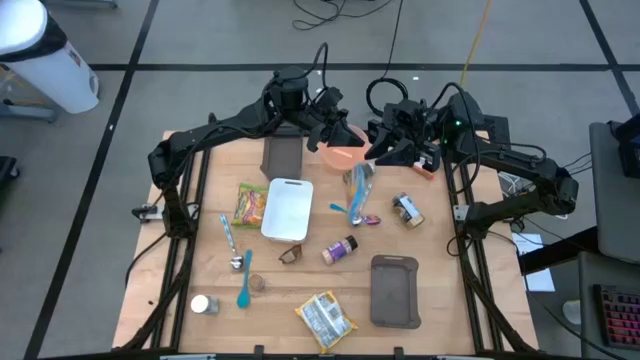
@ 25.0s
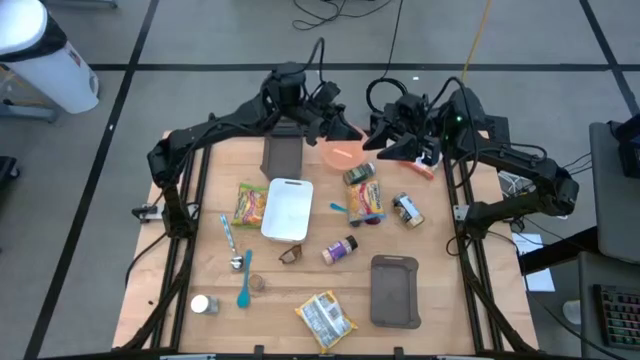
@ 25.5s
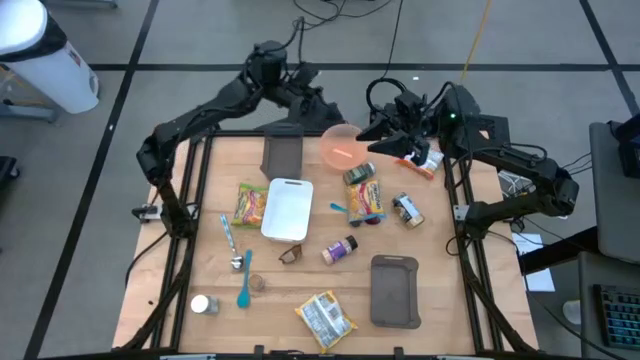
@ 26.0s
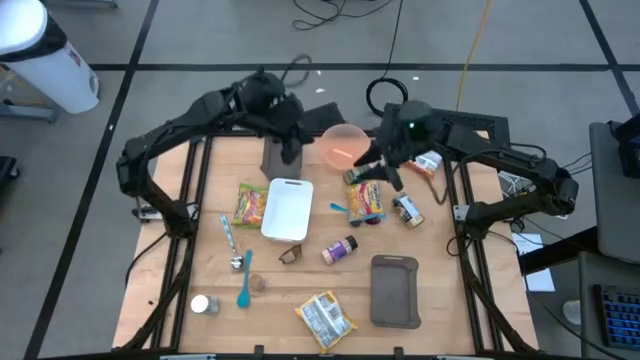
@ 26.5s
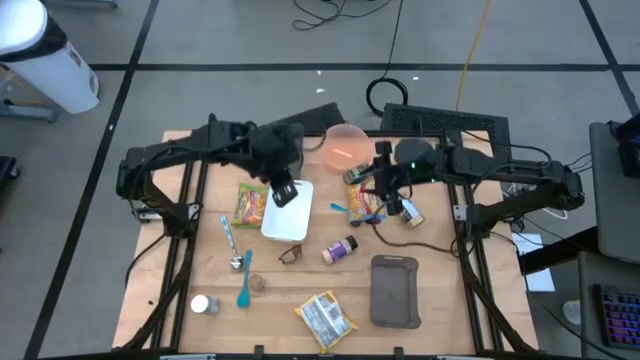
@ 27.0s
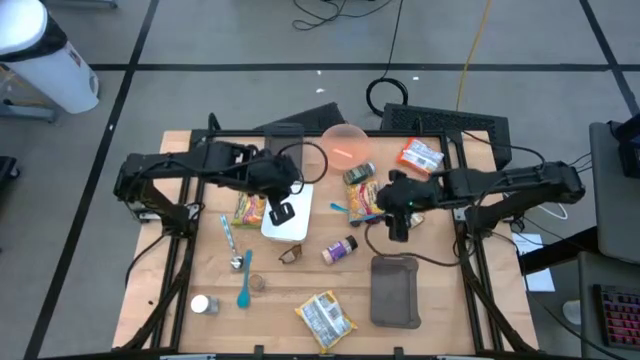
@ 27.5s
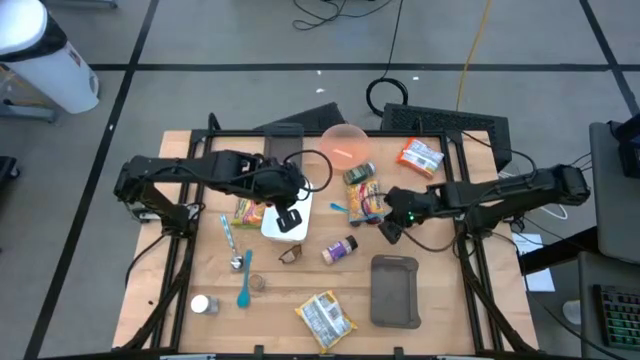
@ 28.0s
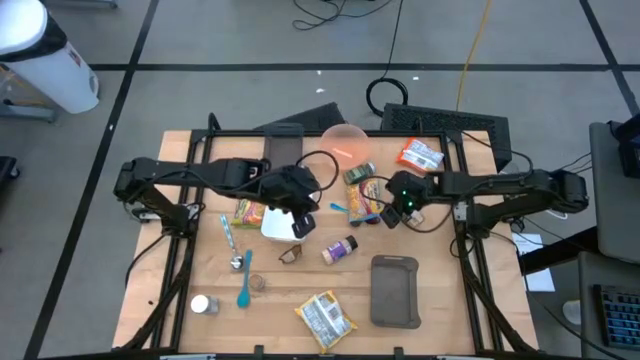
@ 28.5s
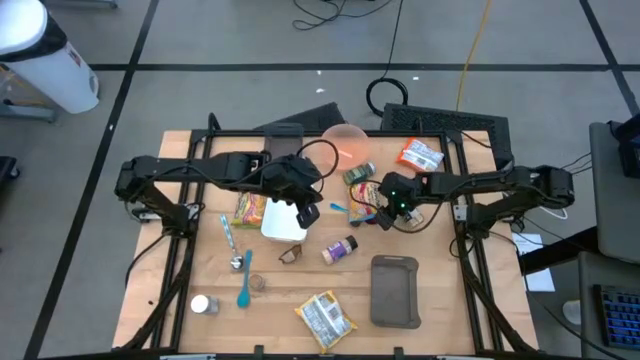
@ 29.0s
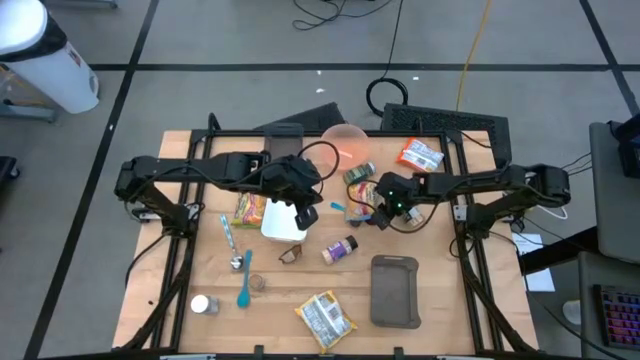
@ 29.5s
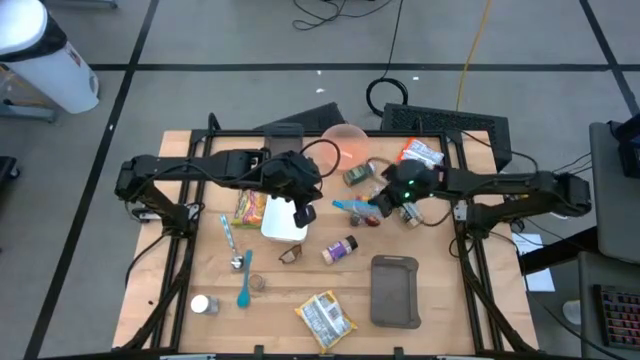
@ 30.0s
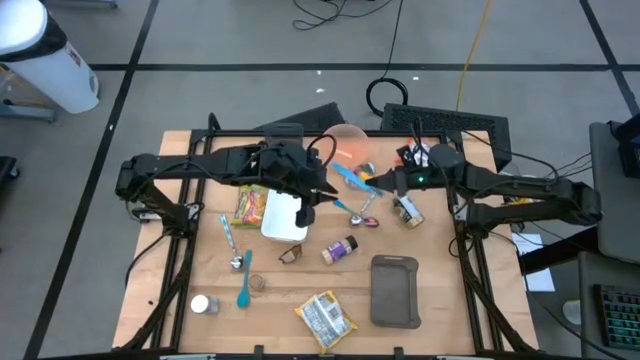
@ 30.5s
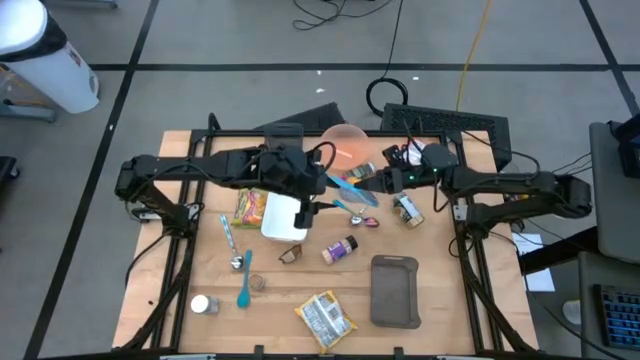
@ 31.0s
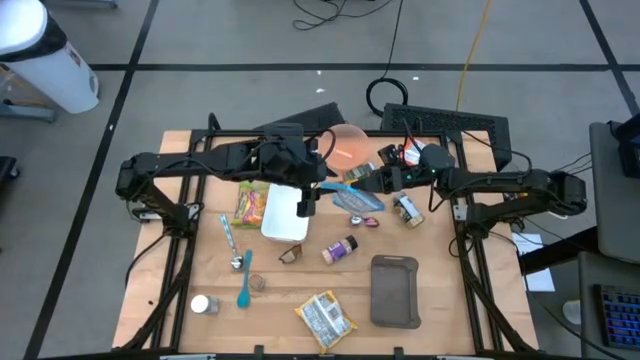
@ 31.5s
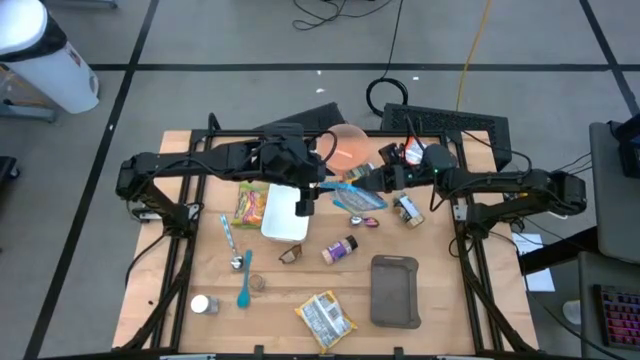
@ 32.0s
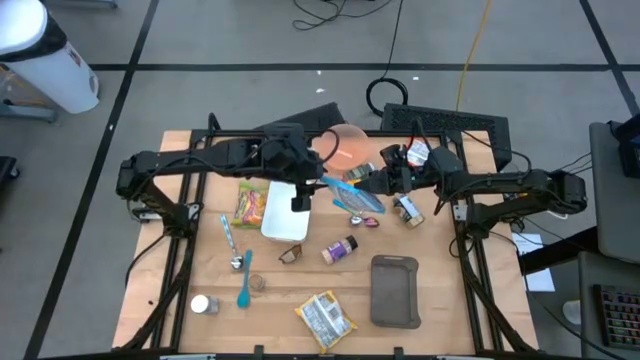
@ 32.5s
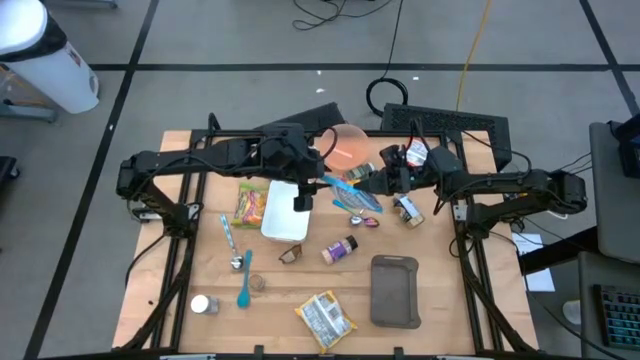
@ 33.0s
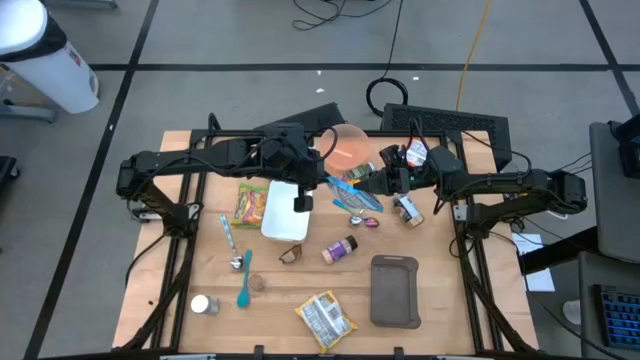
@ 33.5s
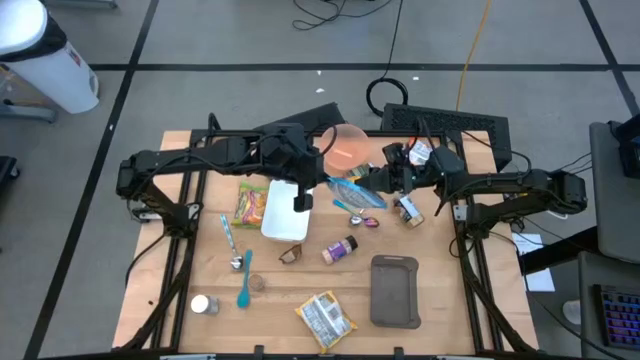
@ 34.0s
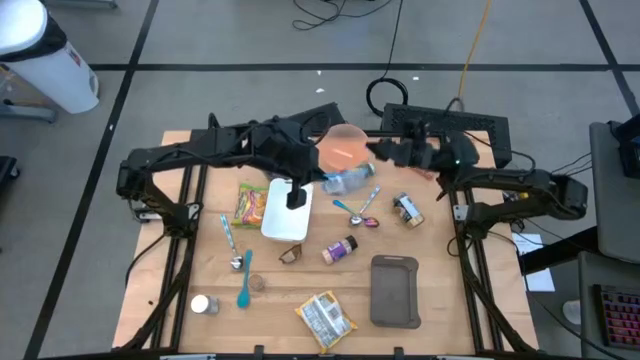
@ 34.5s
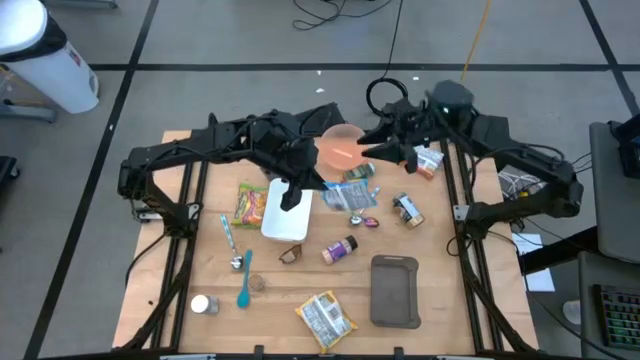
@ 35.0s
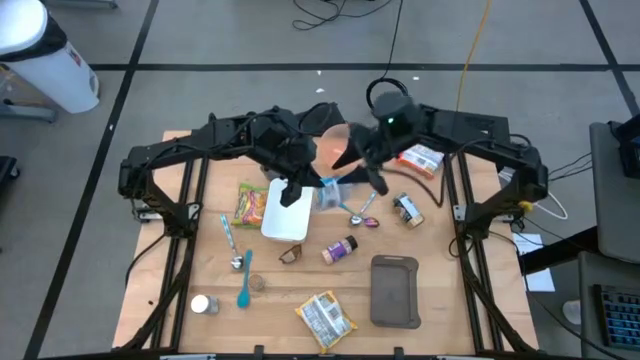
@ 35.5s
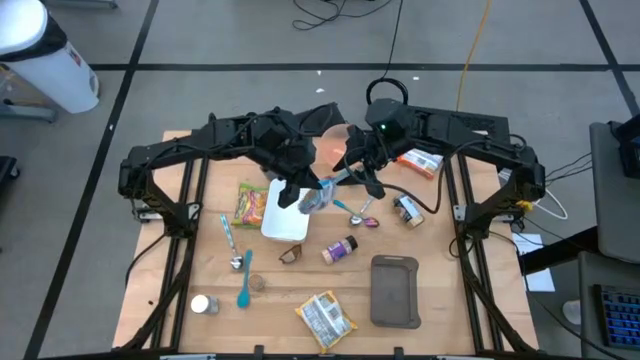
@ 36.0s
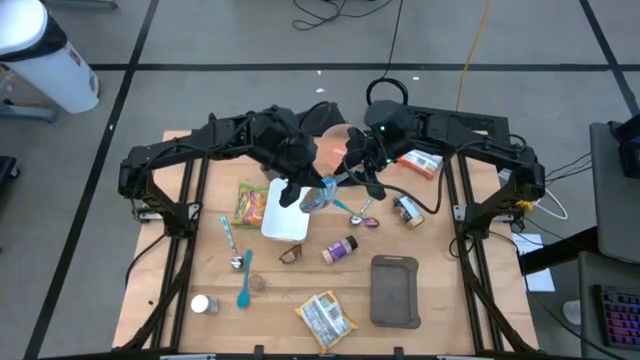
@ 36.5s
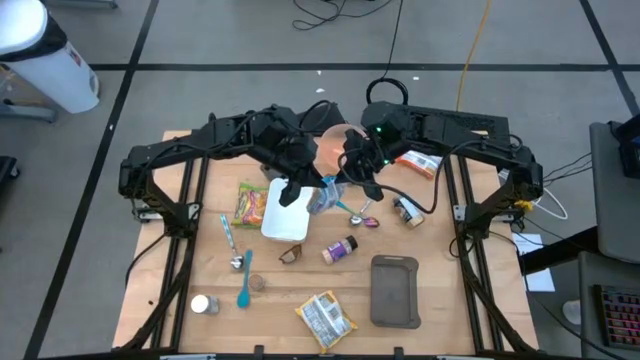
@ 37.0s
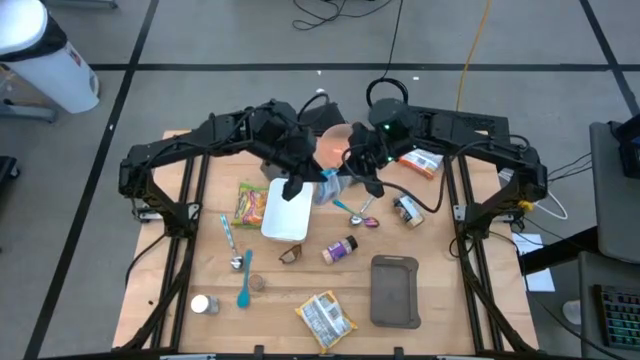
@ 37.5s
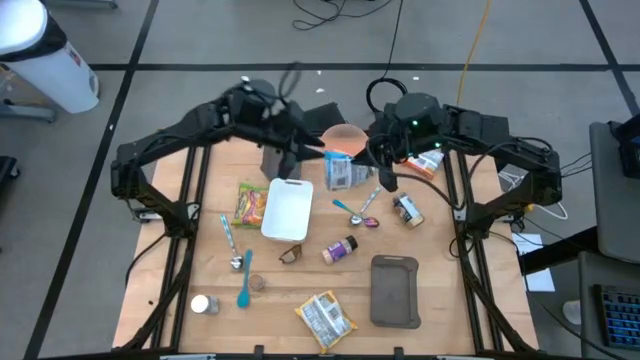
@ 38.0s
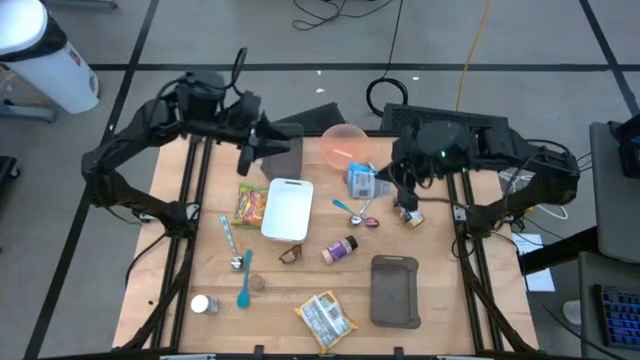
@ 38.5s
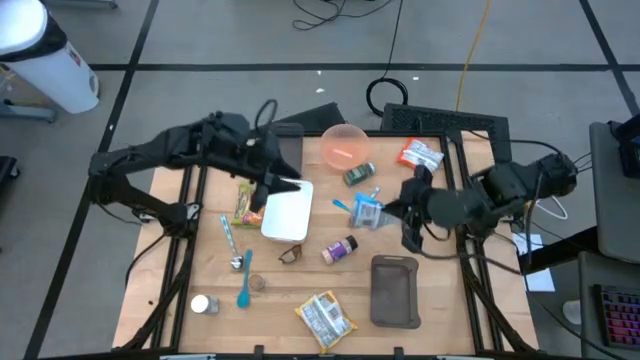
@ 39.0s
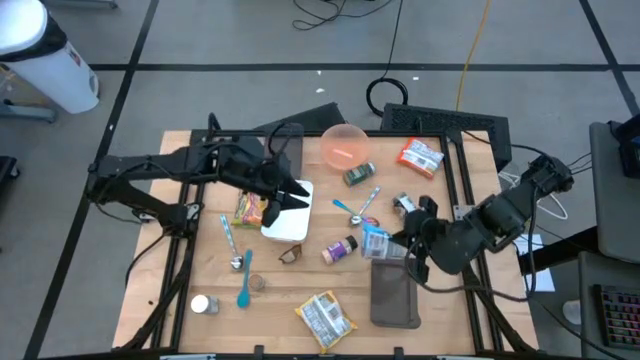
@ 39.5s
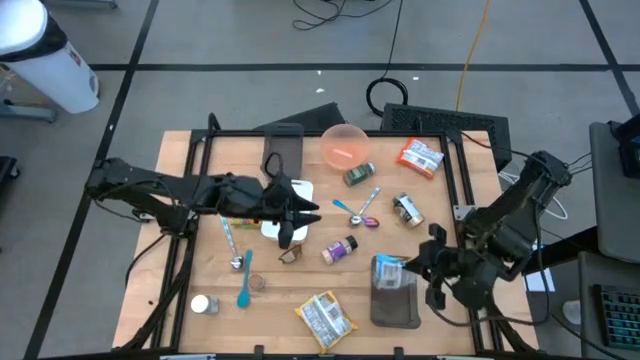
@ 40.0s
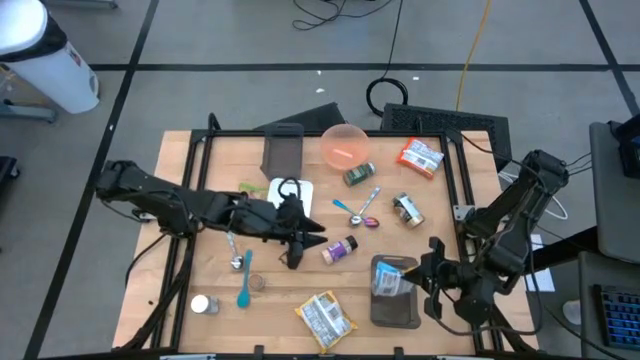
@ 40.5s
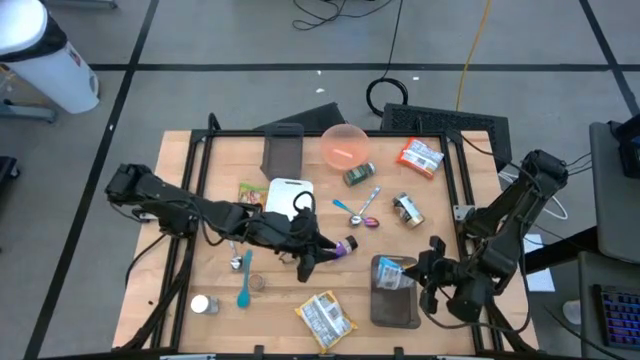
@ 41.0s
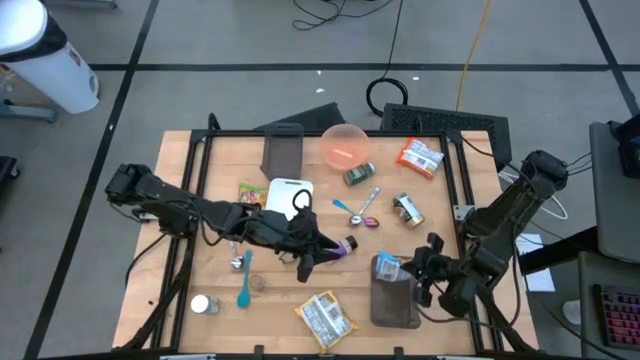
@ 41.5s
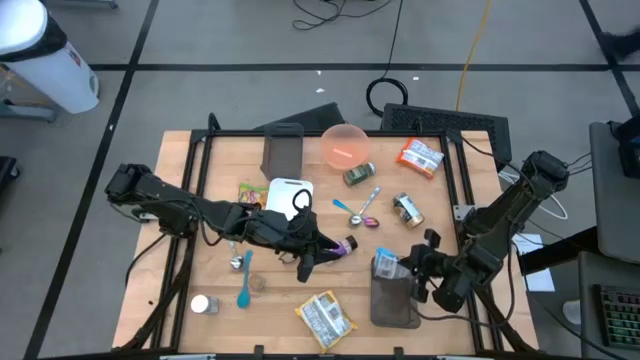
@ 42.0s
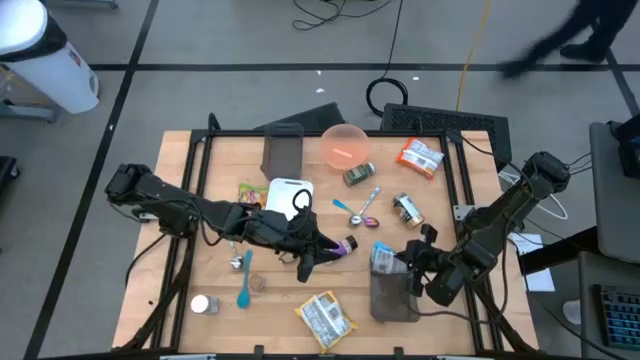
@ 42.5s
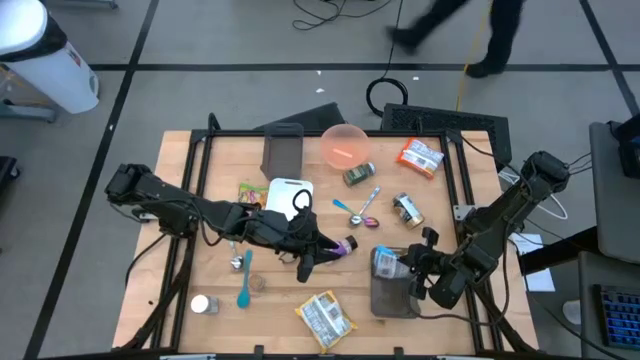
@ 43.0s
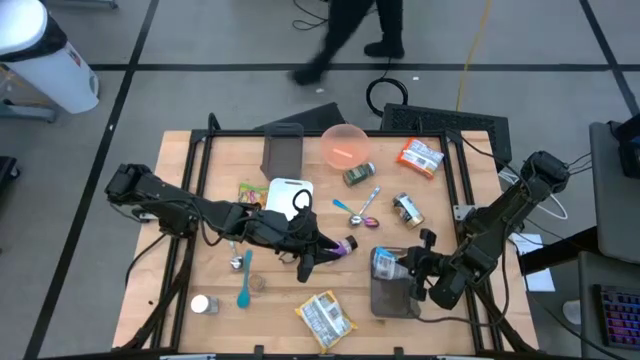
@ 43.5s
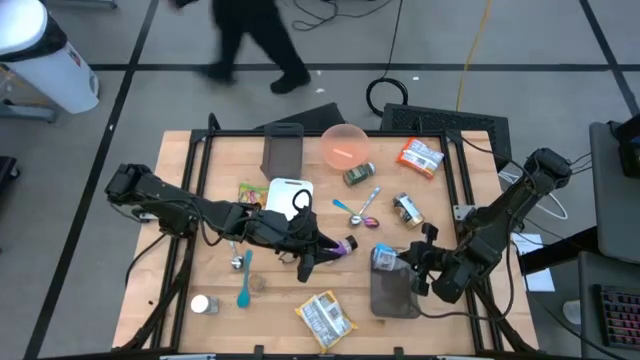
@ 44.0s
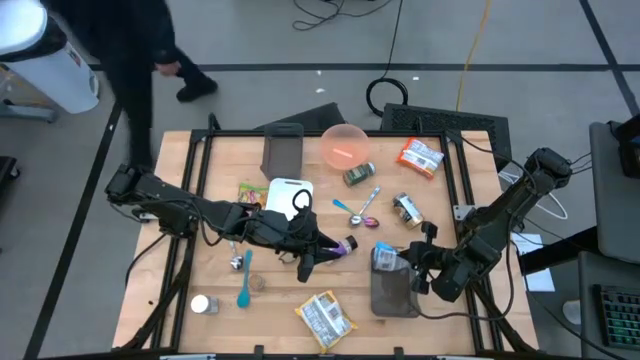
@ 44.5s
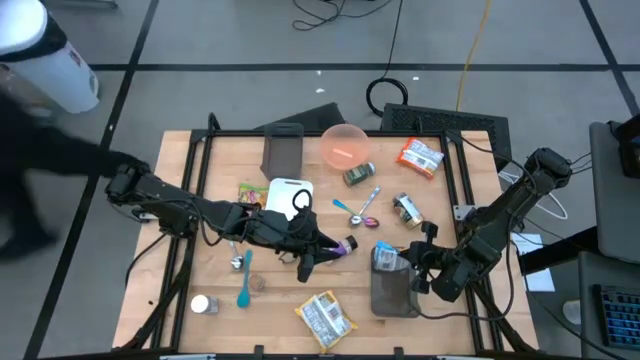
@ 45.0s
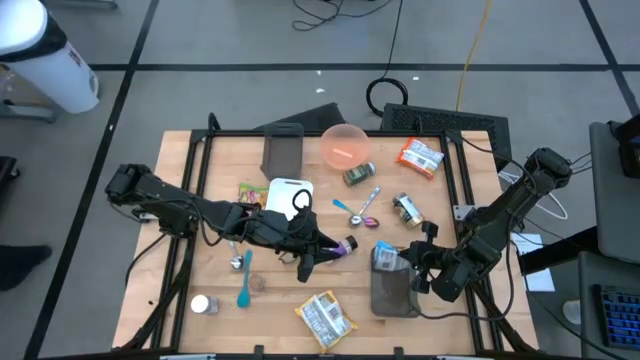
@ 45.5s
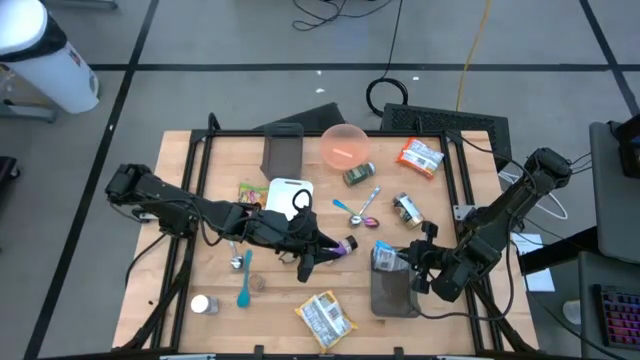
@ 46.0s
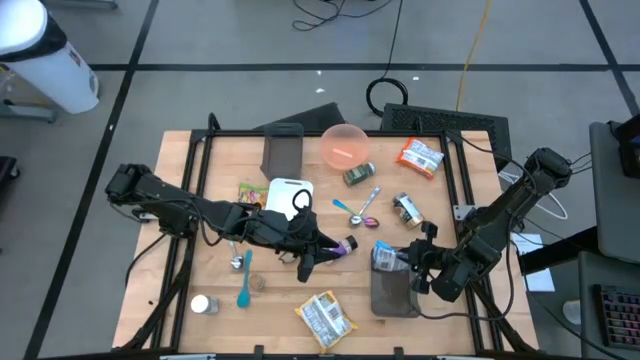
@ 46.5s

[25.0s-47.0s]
Task: Pick & Place Food Item
Put blue noodle pack into the bottom black transparent bin
